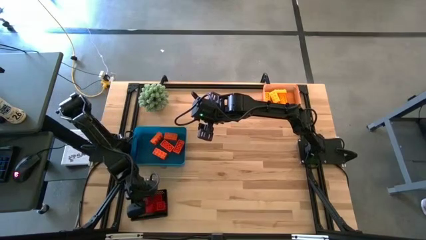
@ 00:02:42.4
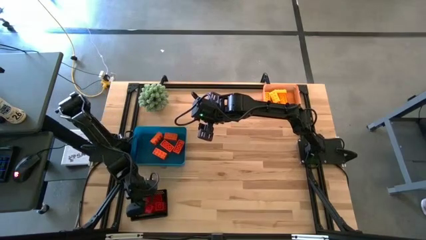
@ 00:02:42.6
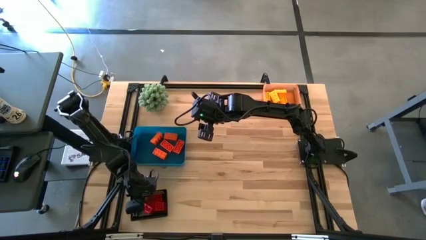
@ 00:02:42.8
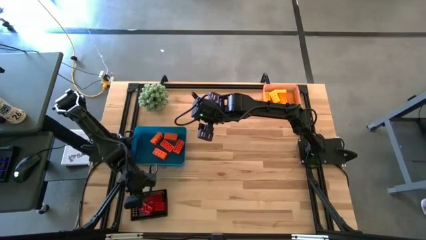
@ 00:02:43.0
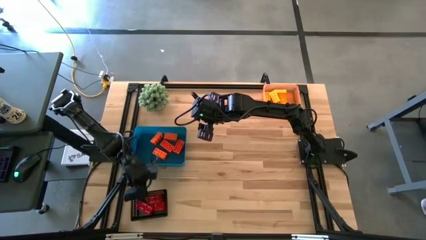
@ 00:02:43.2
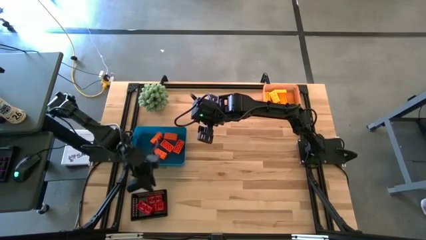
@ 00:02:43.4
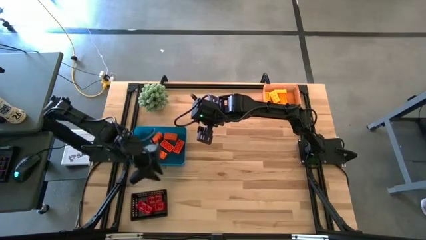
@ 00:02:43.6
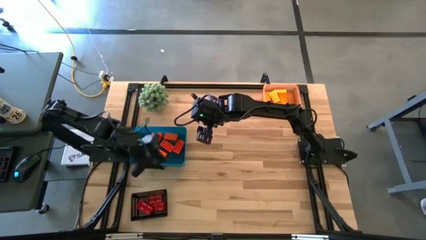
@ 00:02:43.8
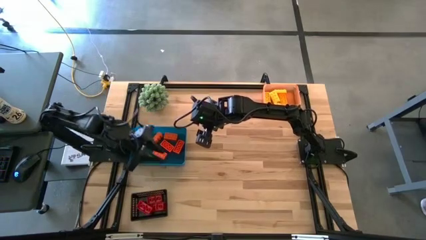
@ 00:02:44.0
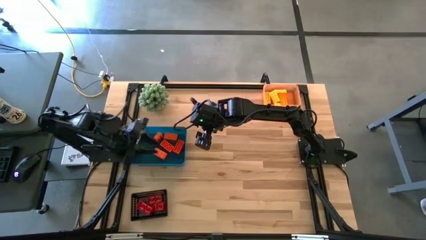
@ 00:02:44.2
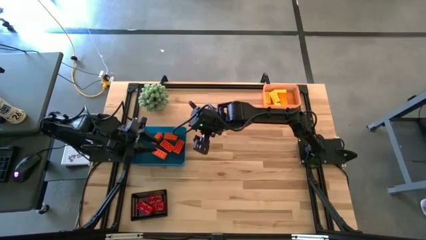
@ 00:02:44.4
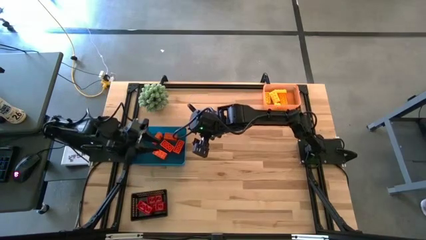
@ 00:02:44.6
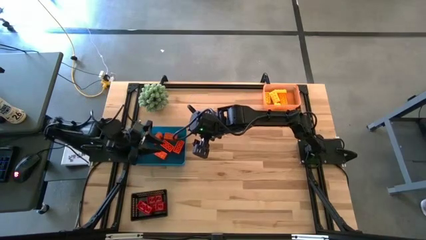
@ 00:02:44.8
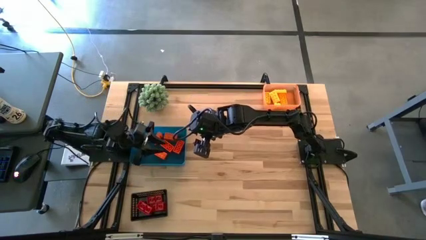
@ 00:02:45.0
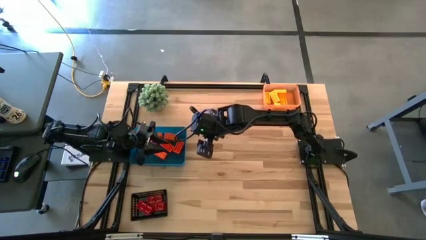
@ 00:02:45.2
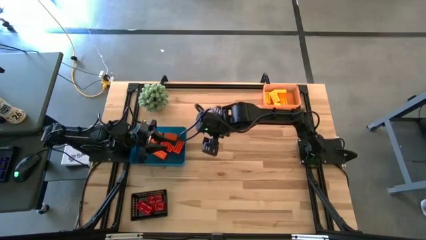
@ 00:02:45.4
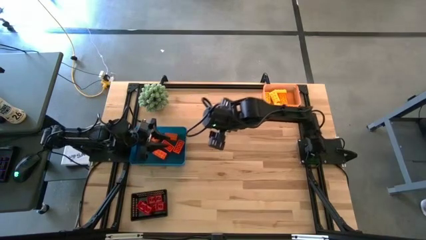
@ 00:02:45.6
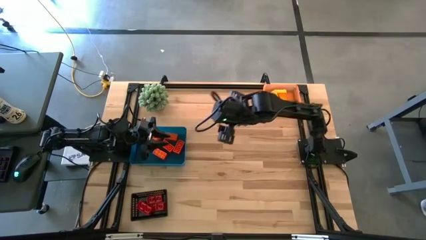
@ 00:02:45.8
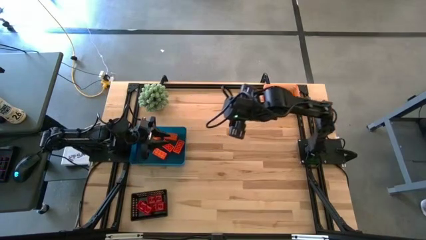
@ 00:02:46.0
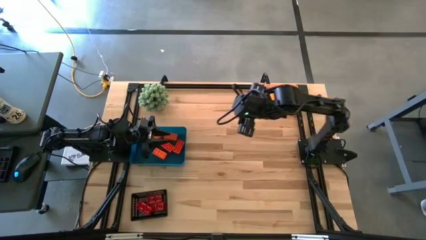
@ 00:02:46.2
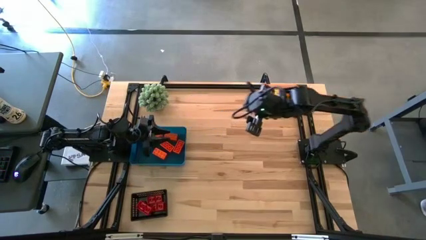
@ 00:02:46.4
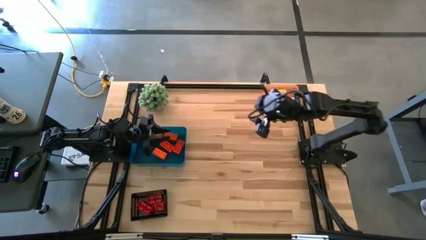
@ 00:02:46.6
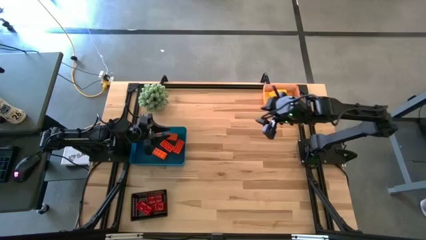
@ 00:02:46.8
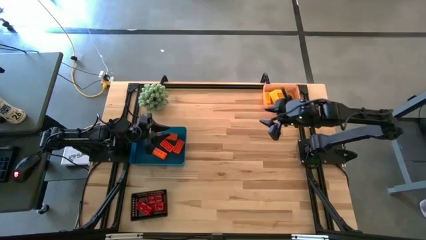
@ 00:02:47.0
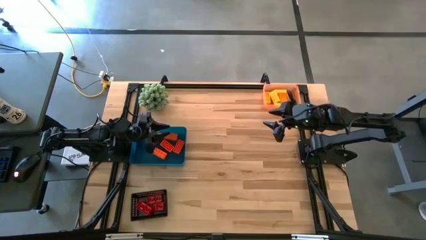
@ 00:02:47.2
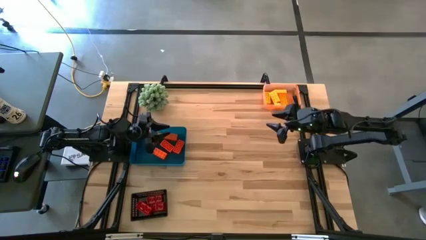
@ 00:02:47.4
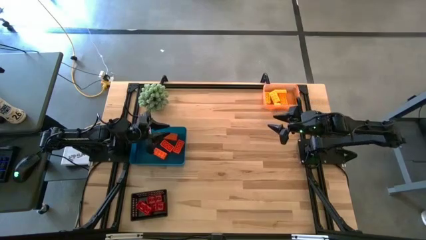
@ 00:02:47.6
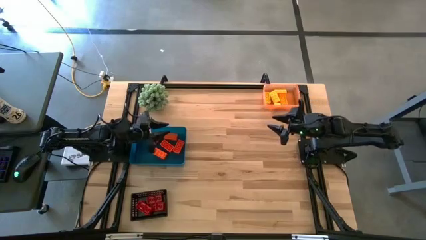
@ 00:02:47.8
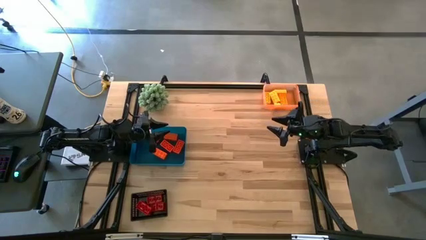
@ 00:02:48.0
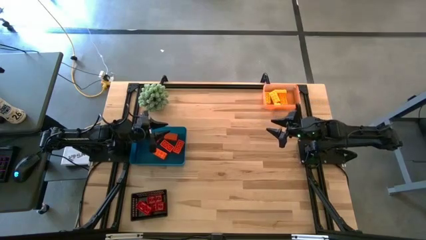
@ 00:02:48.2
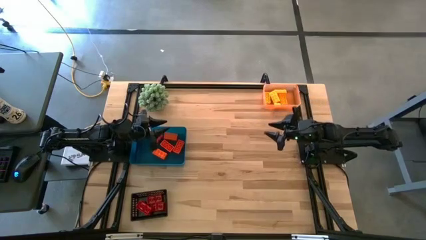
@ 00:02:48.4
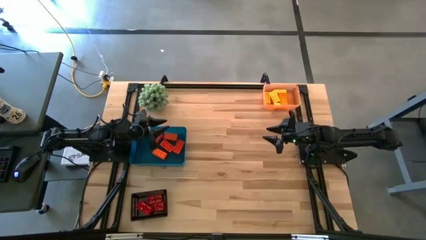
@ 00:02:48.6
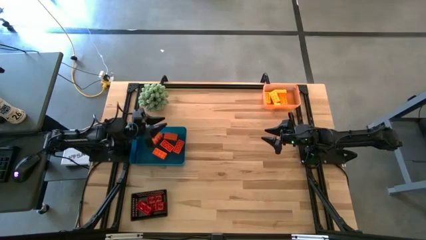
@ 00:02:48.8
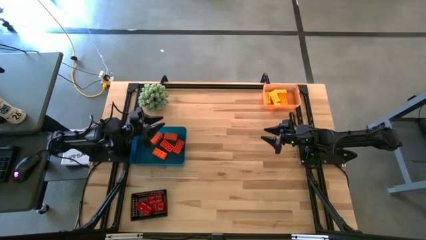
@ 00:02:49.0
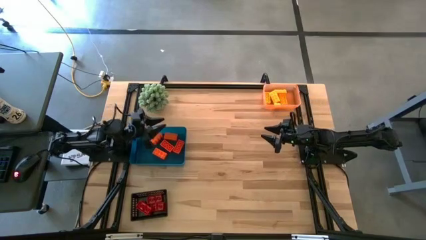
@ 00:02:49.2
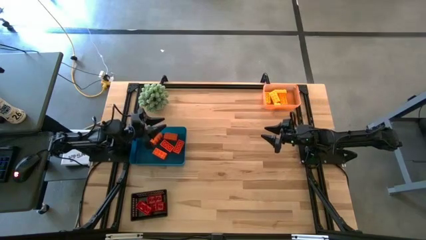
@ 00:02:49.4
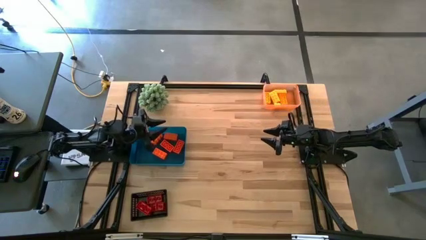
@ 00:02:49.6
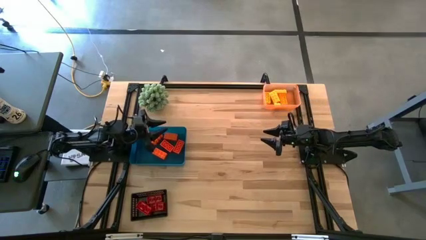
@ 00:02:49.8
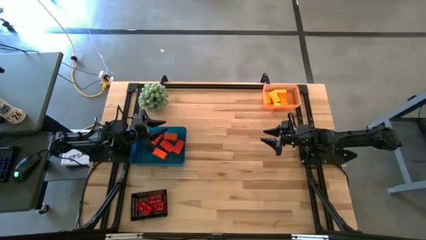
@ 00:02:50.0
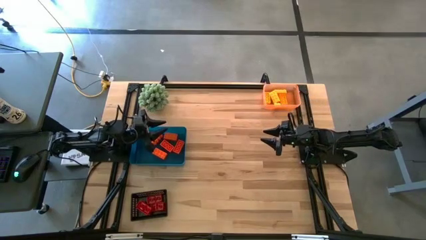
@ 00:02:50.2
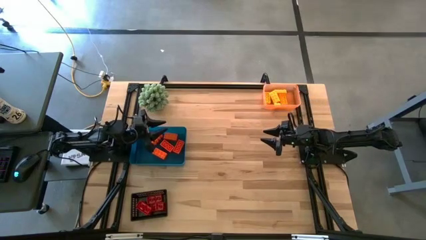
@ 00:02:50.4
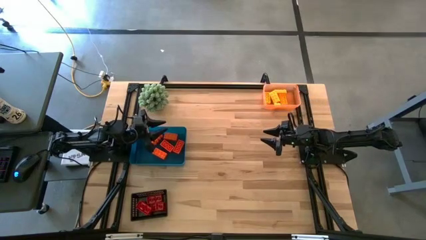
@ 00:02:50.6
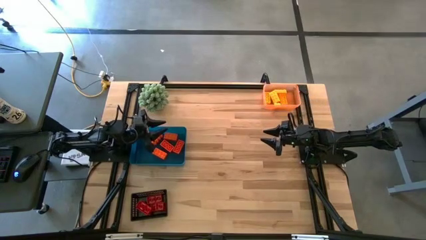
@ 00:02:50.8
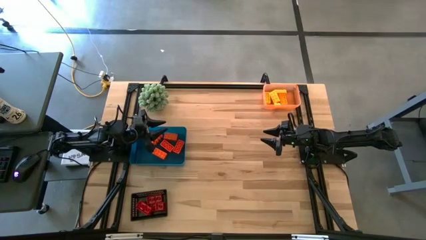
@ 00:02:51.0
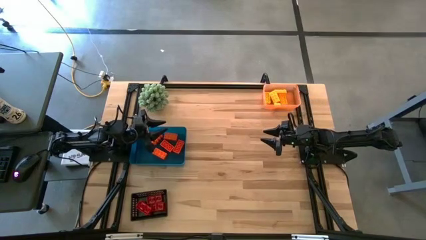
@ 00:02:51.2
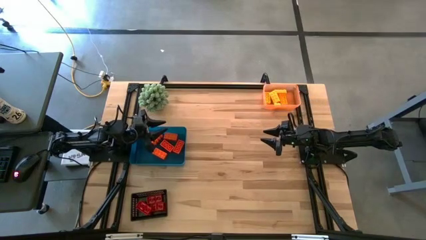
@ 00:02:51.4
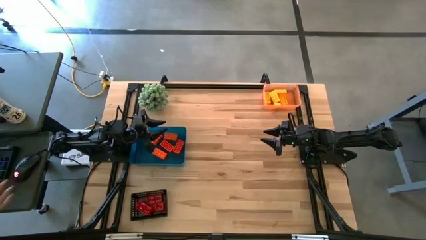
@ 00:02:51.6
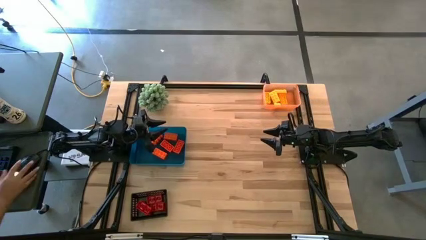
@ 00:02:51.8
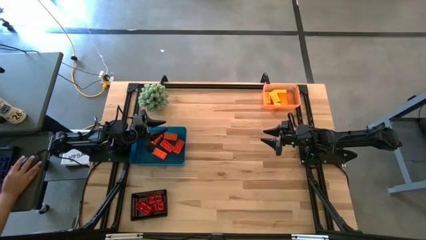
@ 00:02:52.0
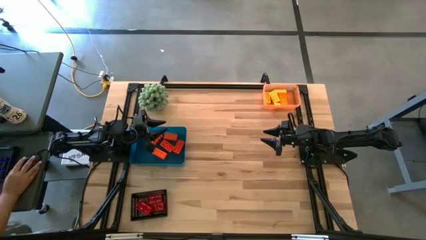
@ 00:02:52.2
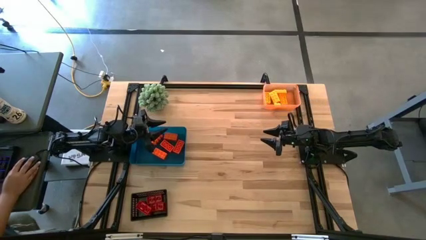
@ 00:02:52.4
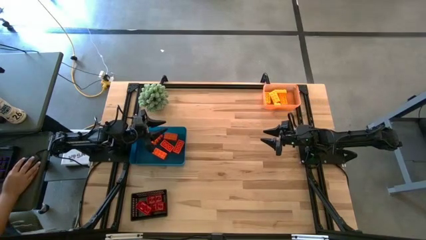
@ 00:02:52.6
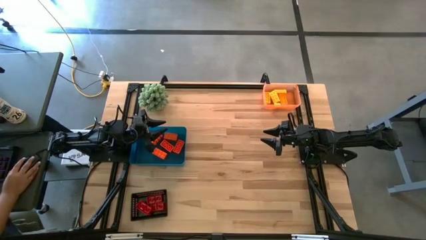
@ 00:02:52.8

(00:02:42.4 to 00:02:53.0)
Task: Sort & place blocks by color
Return to Home Position

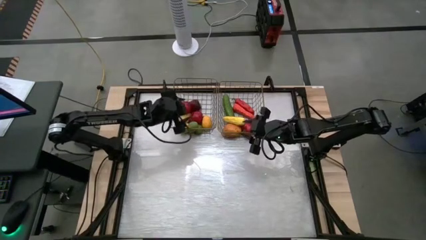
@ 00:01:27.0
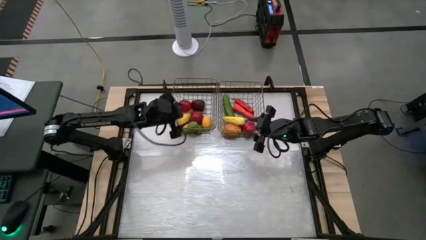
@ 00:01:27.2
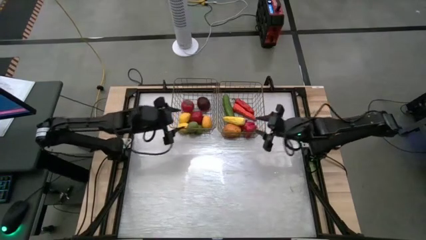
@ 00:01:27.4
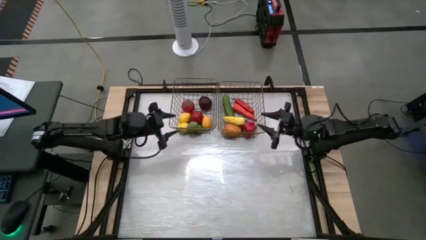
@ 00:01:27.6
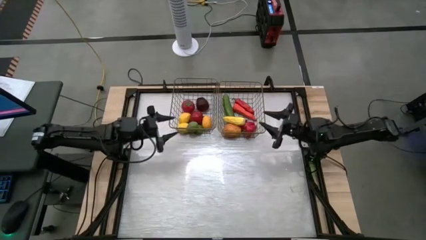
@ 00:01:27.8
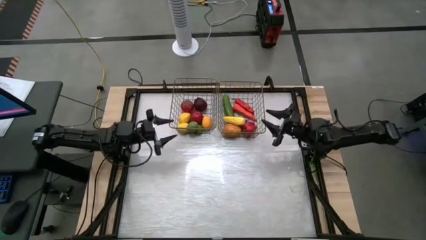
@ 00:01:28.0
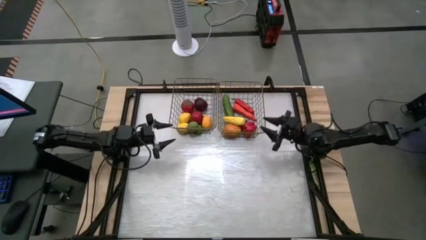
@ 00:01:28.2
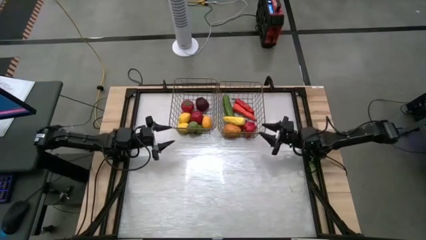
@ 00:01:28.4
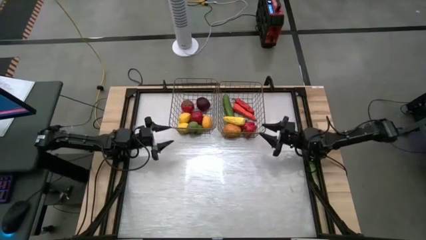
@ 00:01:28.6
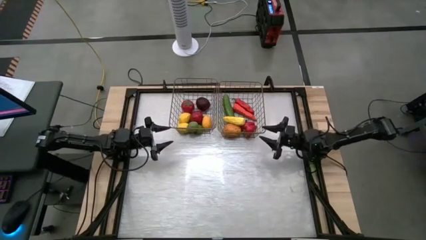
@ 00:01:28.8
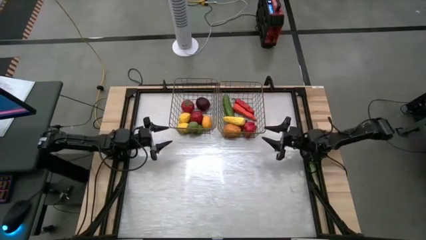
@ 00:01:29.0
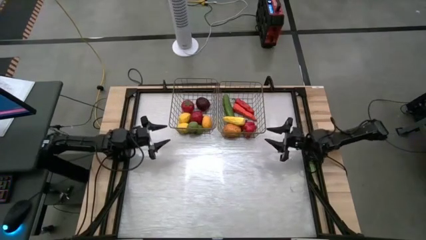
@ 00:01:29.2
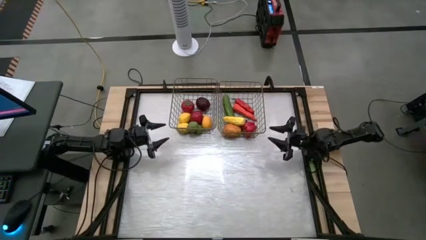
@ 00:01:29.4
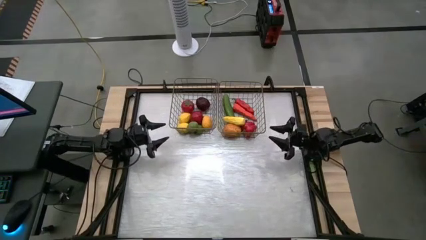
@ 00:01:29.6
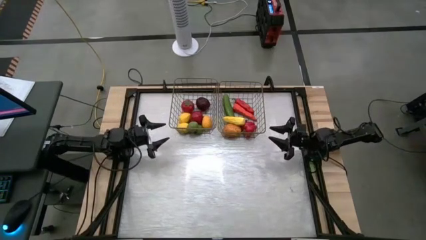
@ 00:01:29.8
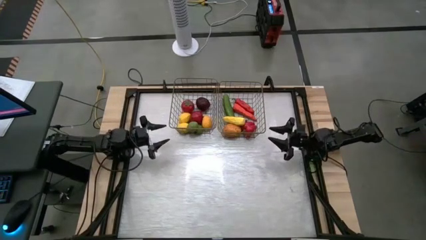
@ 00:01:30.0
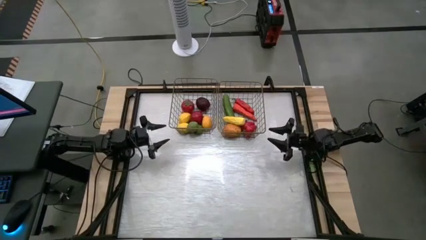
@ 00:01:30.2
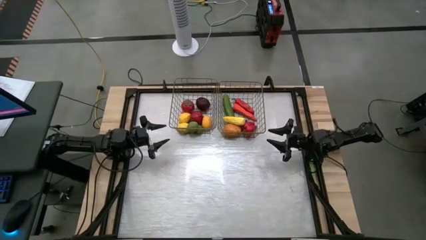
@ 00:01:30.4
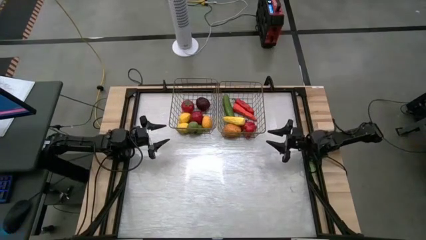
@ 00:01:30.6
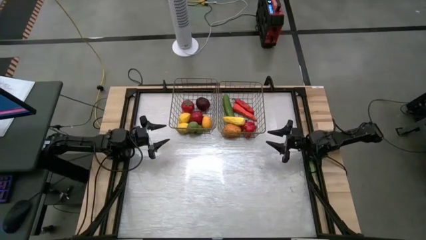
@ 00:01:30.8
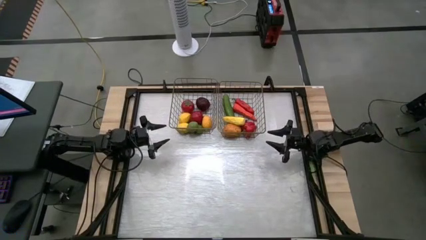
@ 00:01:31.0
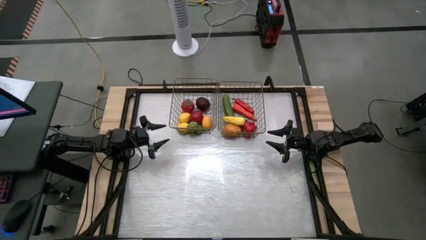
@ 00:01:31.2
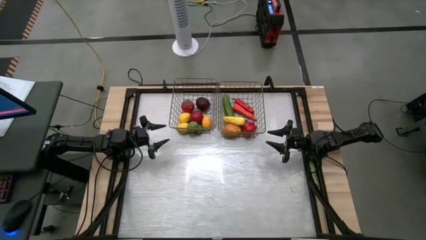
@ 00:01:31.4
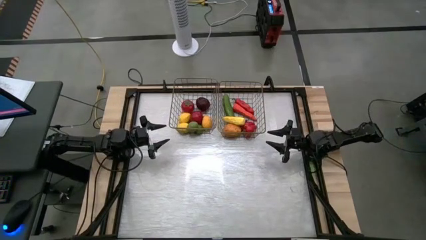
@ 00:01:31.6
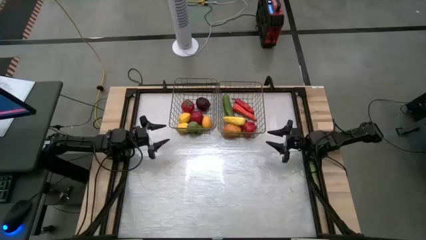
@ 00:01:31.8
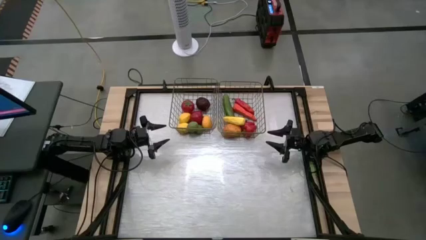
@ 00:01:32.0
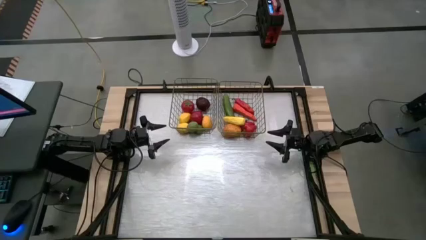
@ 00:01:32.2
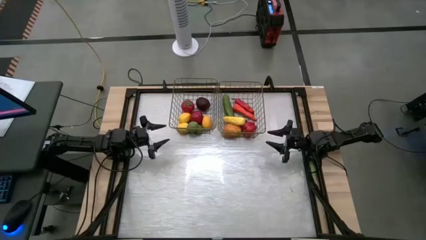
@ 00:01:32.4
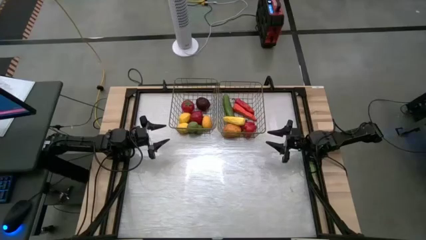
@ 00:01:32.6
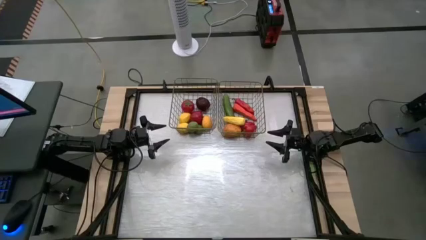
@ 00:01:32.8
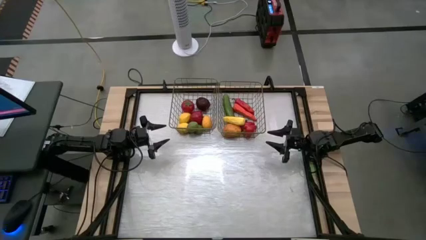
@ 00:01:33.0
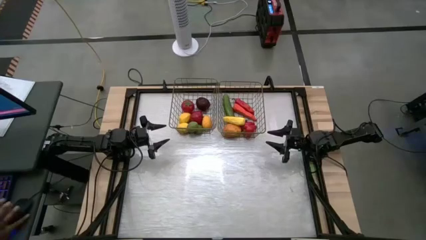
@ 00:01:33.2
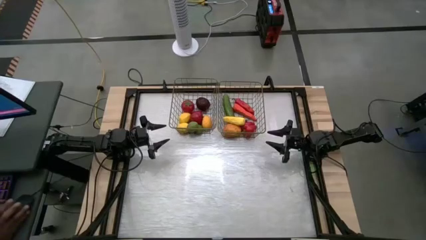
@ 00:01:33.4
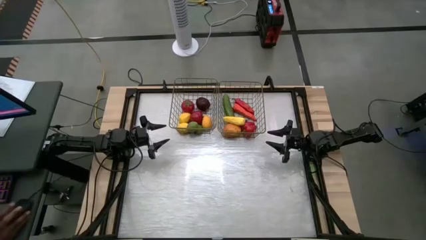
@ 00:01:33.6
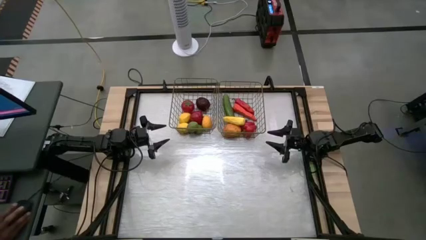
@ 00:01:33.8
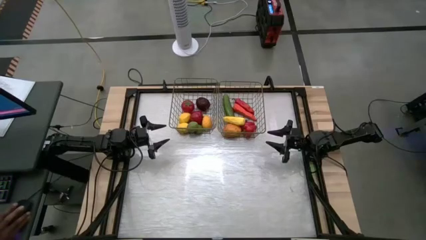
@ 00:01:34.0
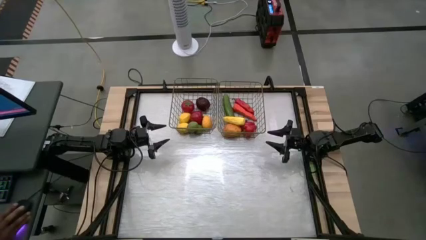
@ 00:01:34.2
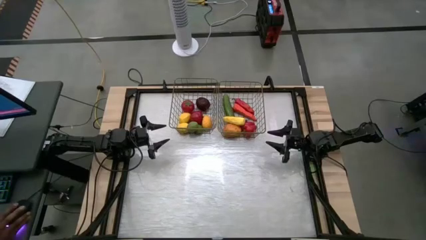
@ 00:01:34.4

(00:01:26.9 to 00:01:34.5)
Task: Sort produce into baskets
Return to Home Position
